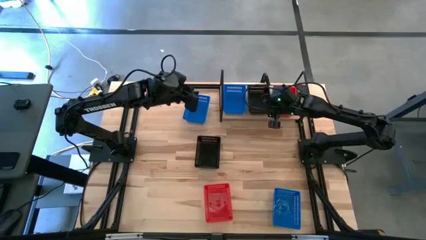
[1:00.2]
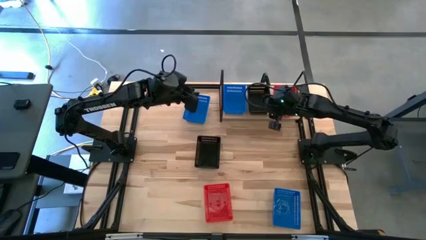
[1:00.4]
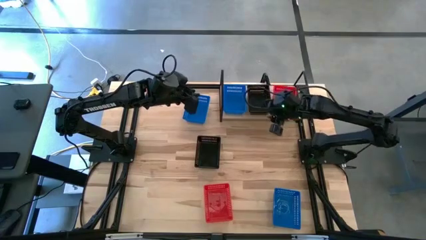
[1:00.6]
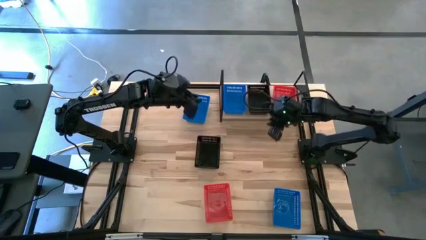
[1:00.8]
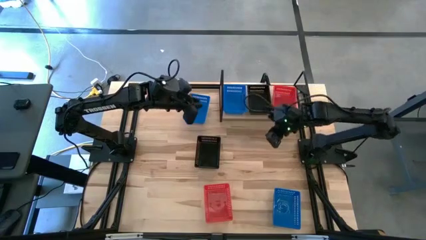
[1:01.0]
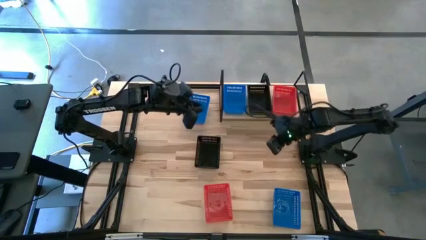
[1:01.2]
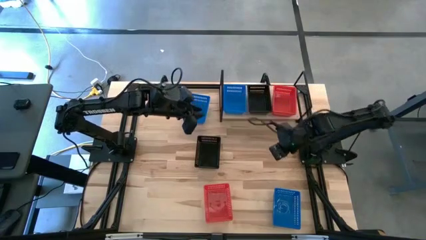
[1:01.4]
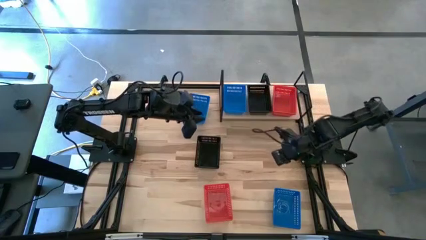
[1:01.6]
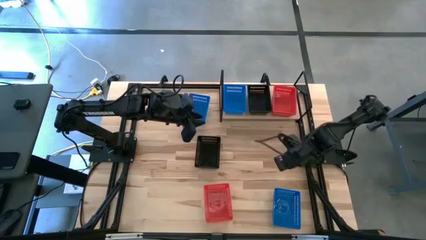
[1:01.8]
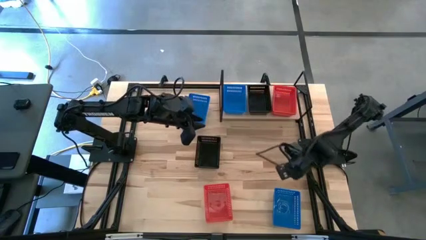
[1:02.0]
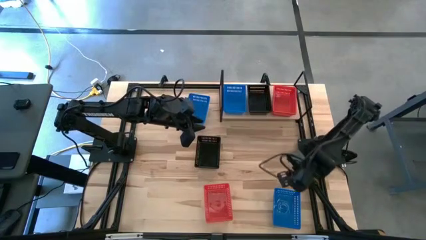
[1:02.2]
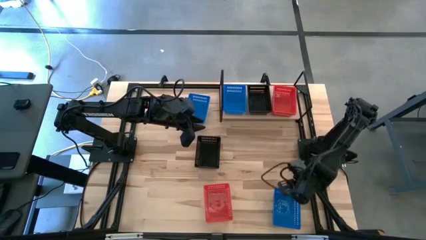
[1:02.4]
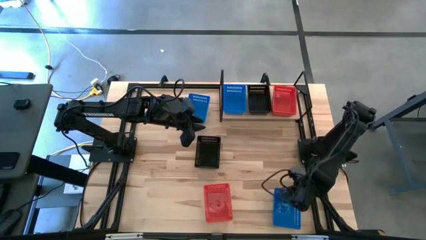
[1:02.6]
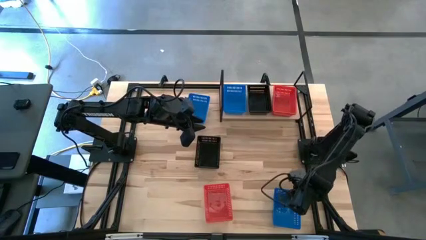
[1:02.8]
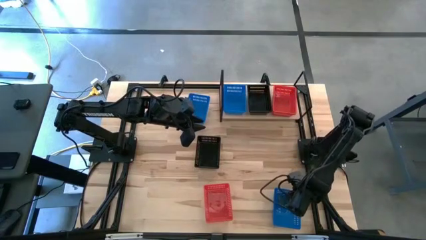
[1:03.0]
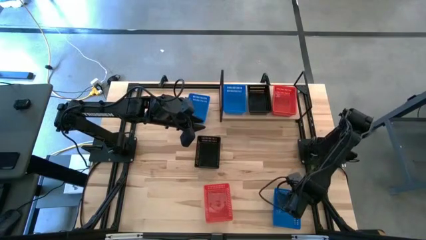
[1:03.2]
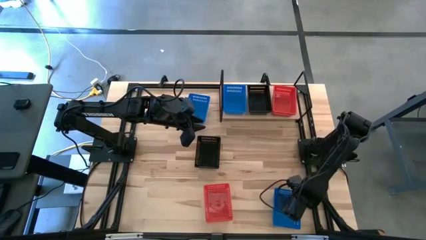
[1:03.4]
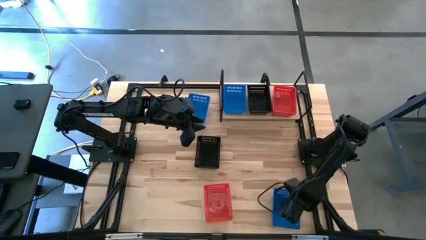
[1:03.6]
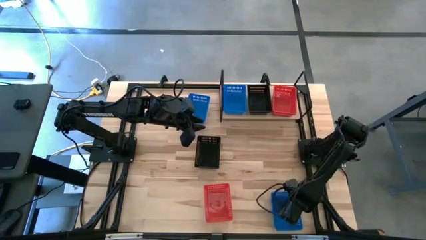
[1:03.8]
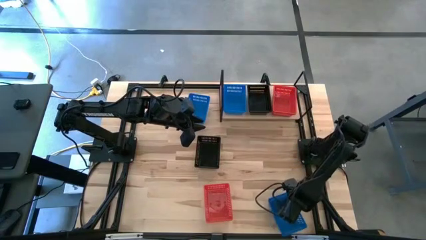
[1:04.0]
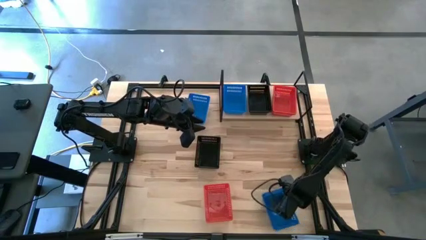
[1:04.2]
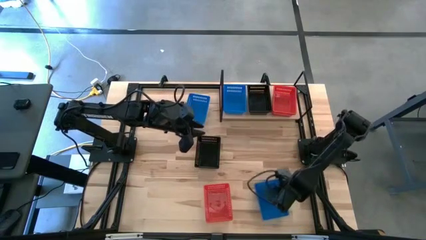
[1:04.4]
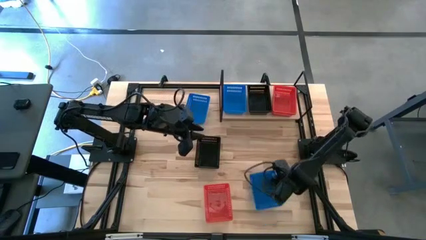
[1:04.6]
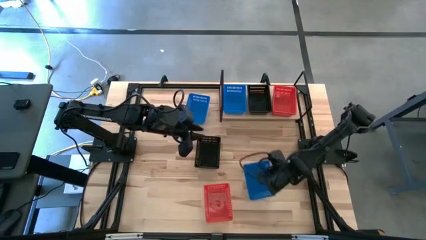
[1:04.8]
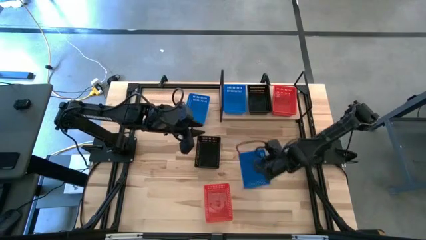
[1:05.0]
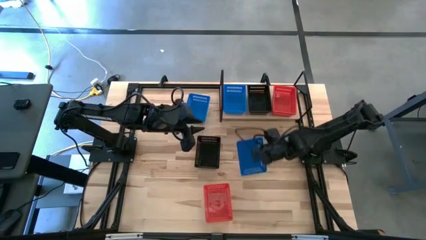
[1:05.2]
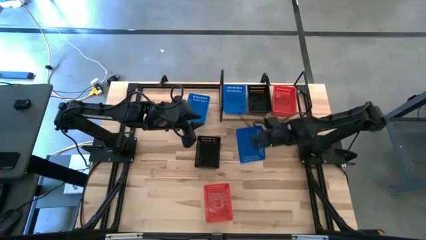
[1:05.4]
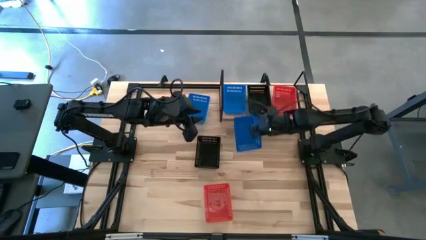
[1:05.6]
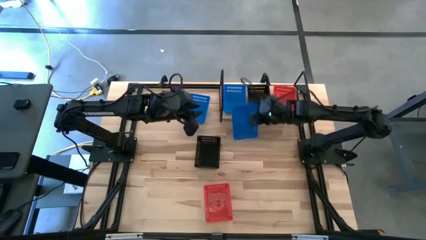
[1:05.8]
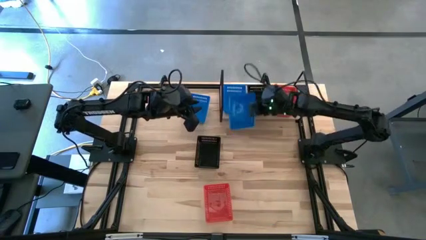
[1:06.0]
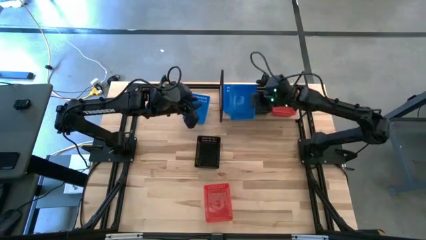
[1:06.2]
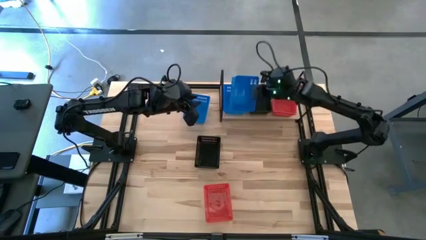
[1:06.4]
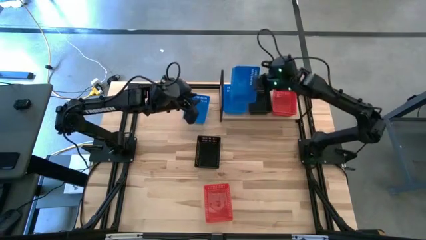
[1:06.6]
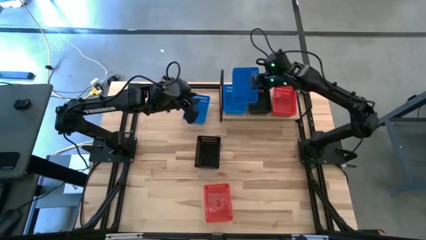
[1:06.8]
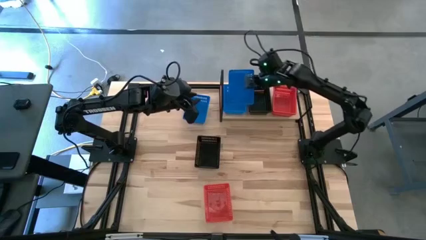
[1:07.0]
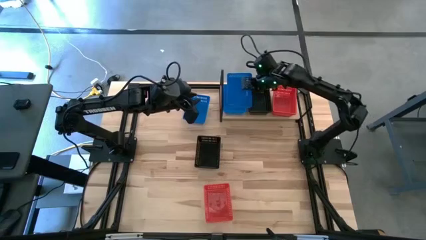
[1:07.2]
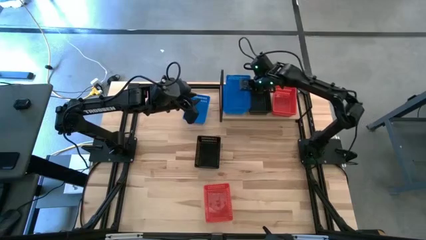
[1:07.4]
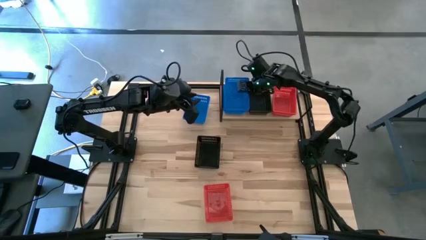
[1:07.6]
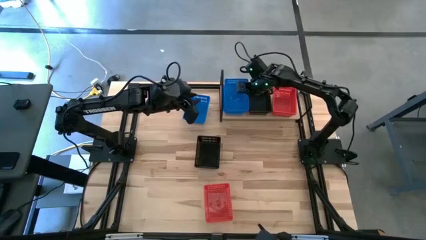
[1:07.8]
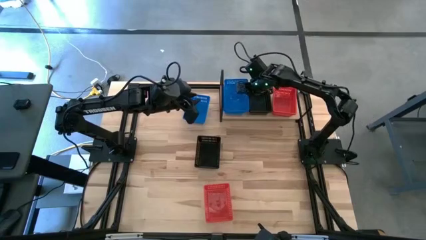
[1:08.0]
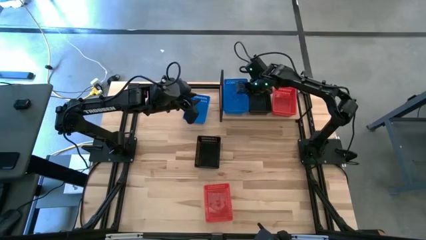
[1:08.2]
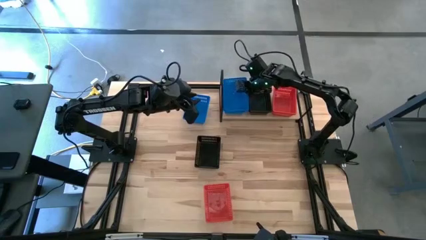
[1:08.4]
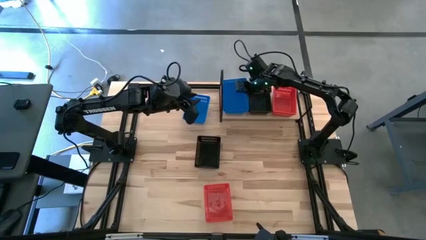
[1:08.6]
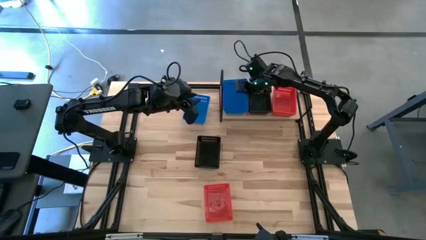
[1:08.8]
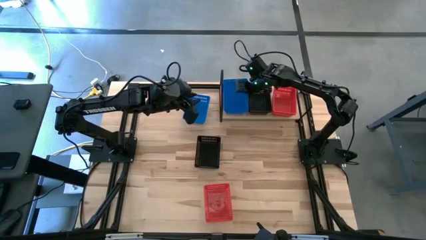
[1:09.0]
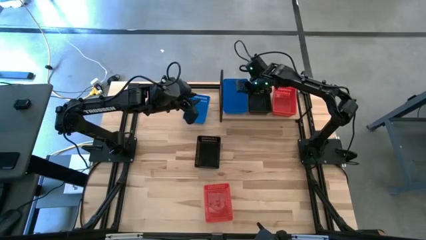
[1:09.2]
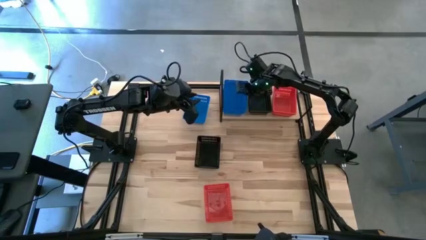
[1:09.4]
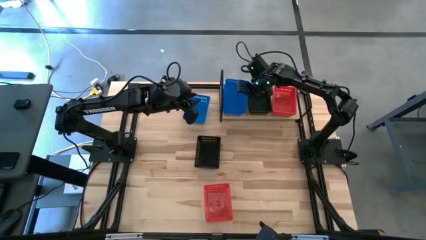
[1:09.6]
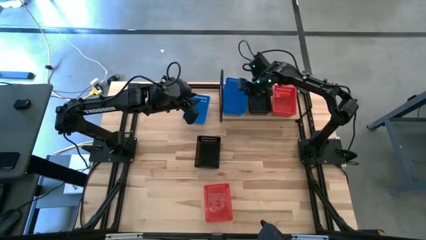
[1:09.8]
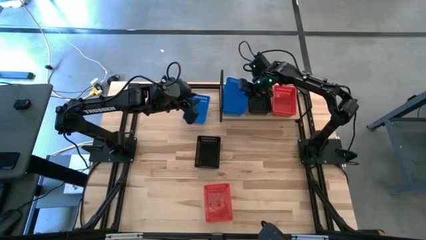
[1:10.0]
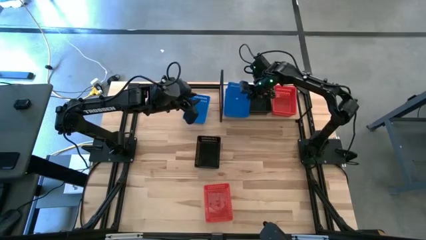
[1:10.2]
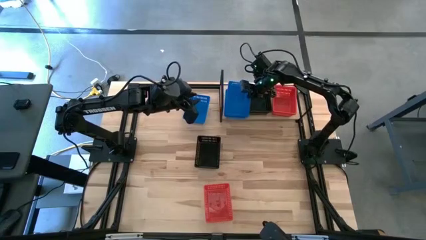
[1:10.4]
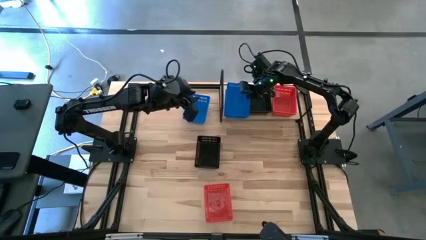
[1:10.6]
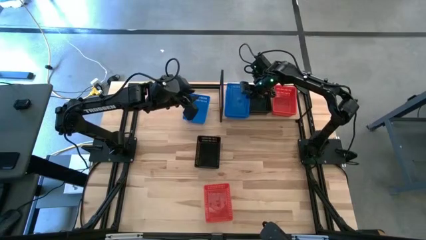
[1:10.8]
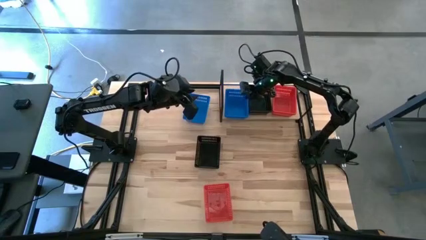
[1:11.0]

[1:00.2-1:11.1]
Task: Stack baskets on shelf by color
Stack the bottom blue bin on top of the other blue bin on the shelf

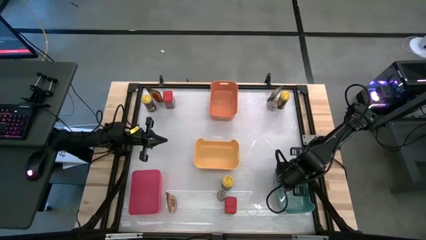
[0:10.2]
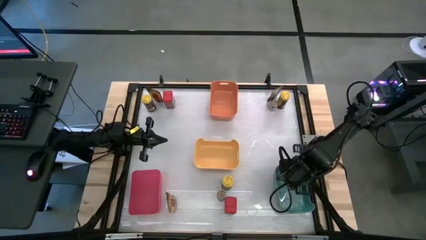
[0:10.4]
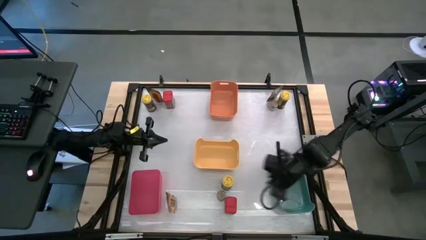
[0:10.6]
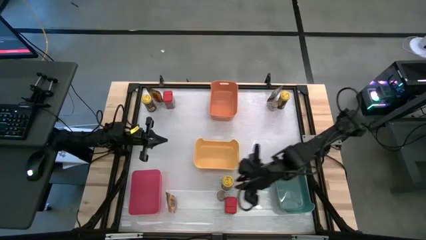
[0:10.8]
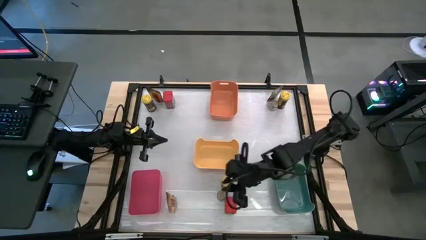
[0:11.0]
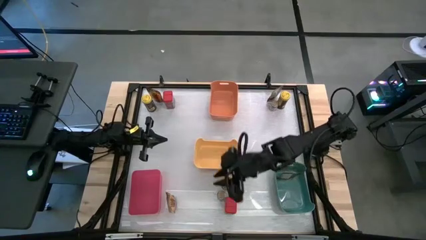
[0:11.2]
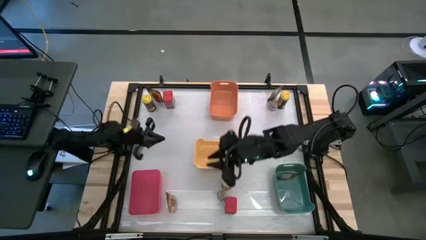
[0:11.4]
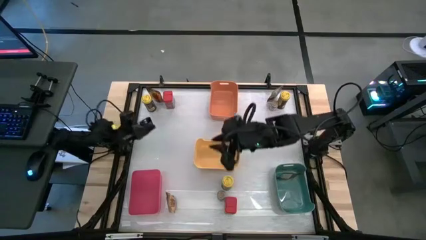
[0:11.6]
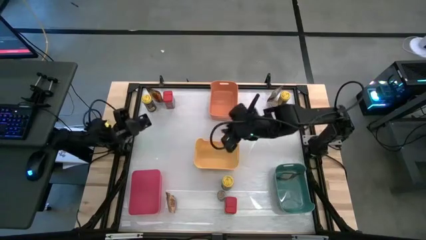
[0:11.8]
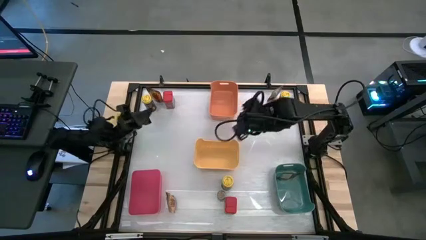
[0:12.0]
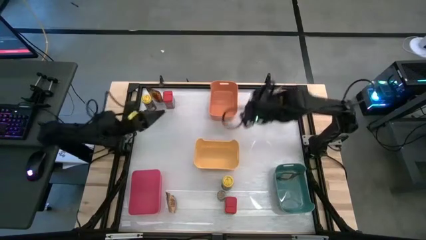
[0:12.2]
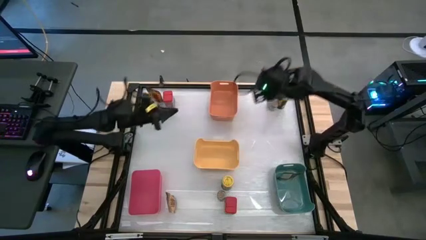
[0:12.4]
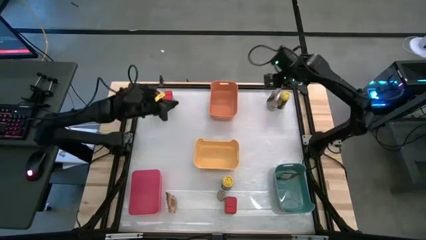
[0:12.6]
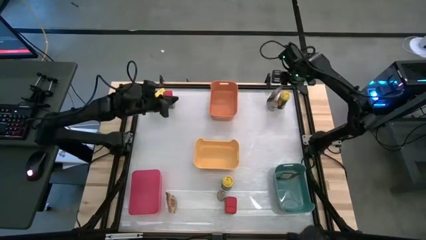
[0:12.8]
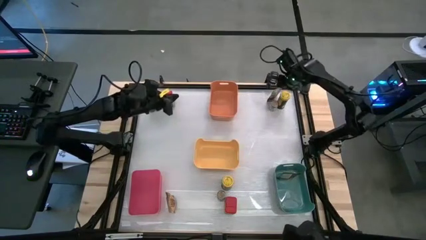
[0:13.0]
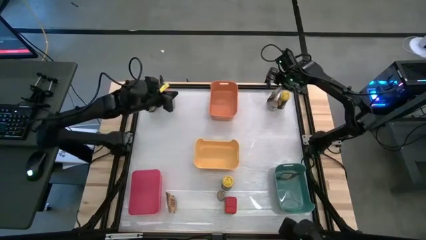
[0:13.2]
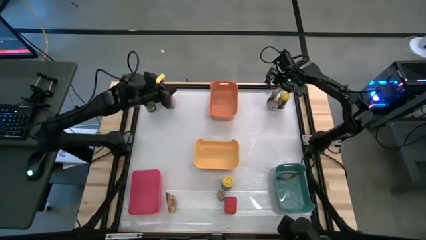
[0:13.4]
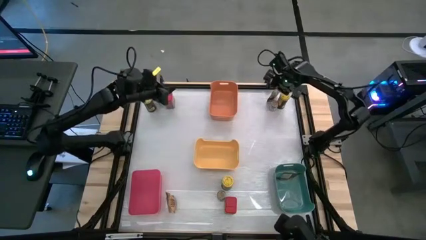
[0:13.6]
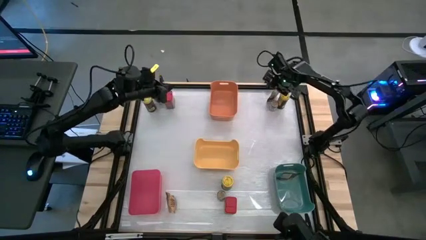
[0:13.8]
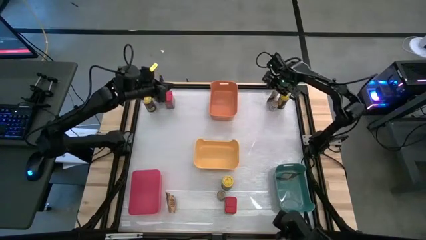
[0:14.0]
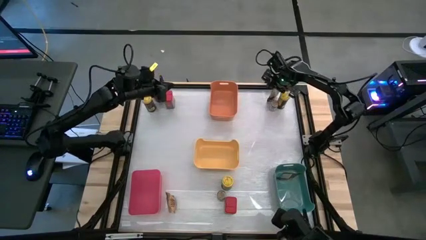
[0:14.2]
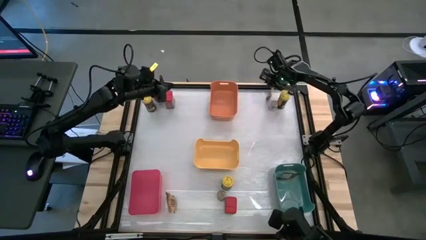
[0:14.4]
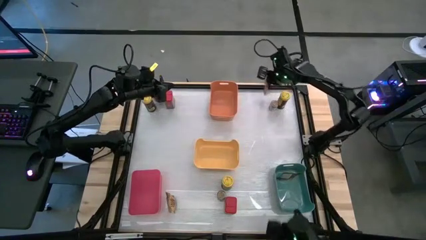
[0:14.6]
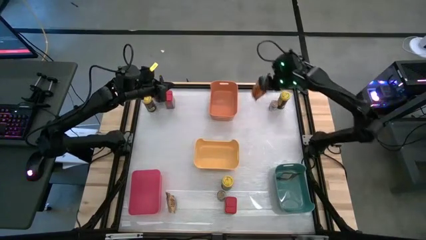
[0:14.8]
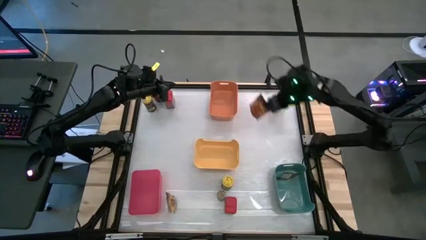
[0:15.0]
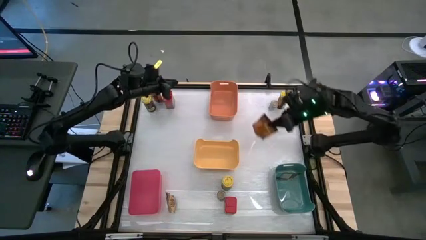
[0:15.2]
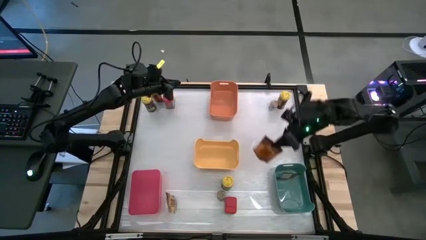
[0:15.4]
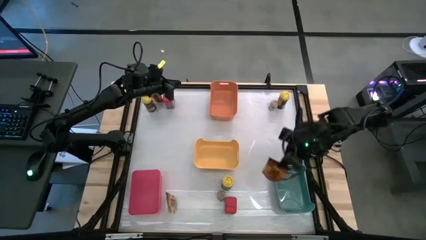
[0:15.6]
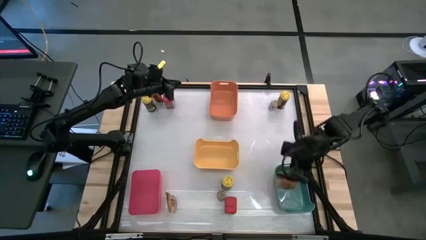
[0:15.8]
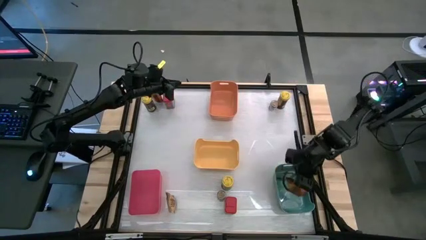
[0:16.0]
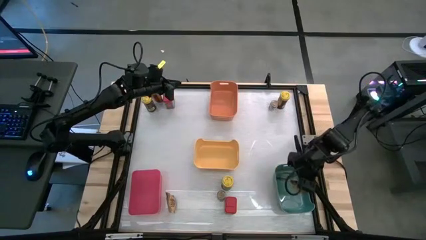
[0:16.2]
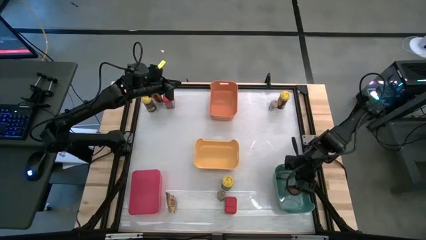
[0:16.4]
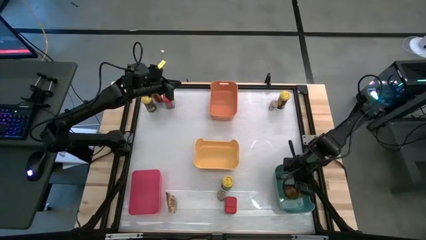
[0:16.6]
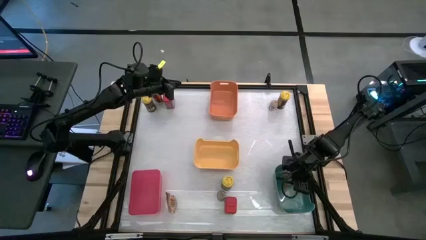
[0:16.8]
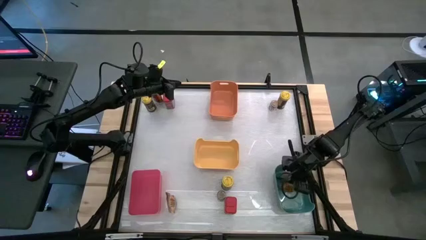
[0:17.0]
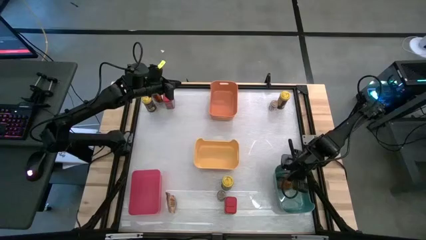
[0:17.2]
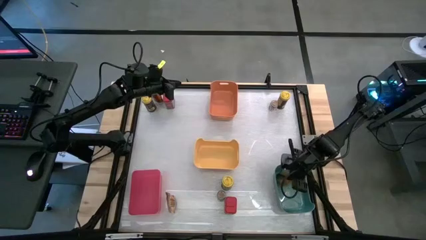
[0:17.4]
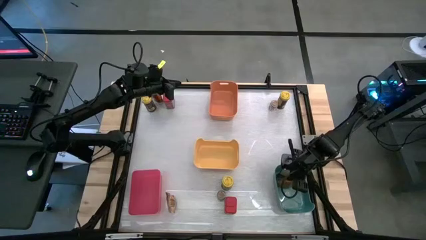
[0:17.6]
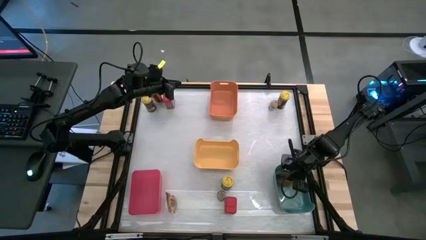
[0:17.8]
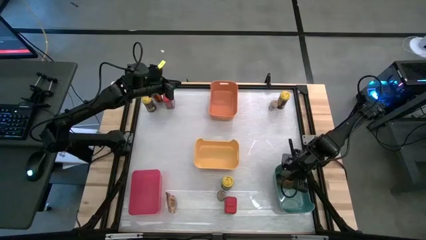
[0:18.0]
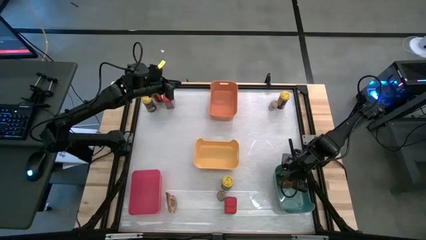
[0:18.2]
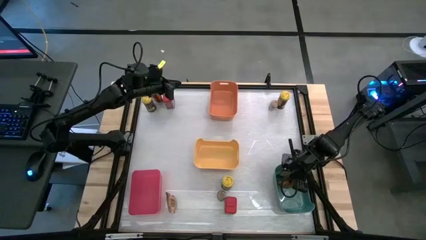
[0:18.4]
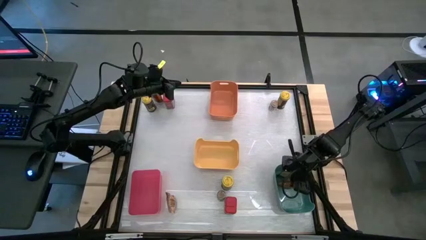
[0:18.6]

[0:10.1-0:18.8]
Task: Sort spices by type
Put the top right orange seasoning bag into the blue bin
